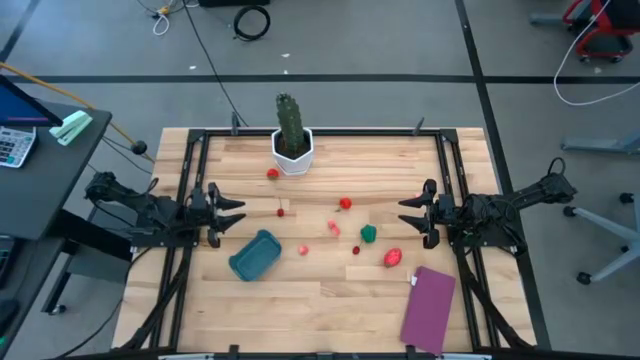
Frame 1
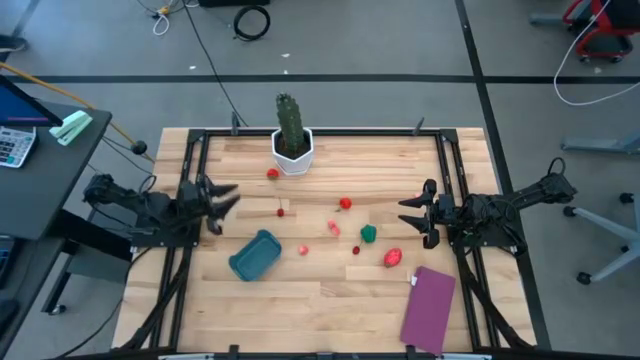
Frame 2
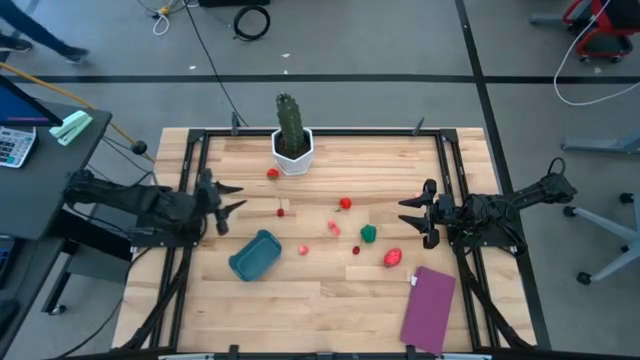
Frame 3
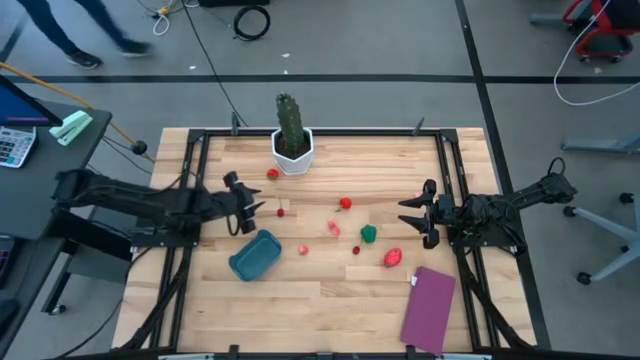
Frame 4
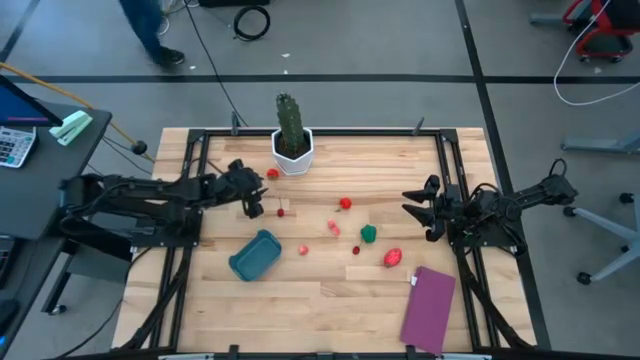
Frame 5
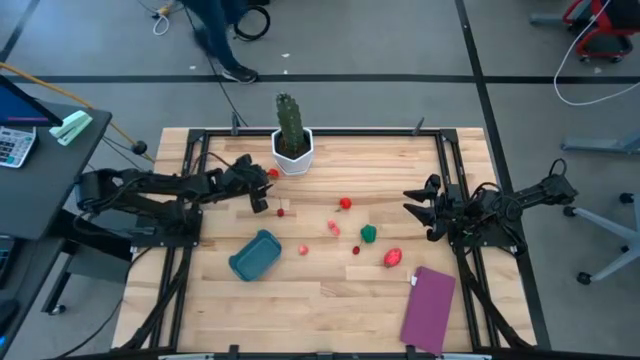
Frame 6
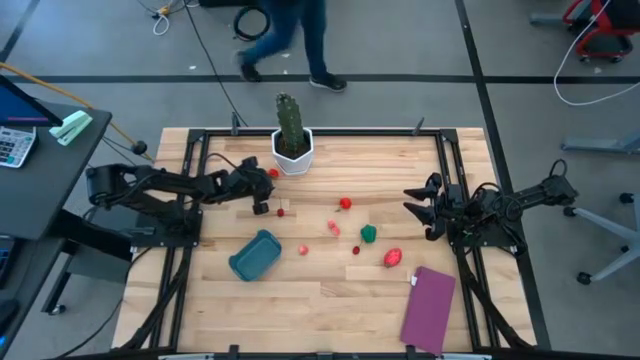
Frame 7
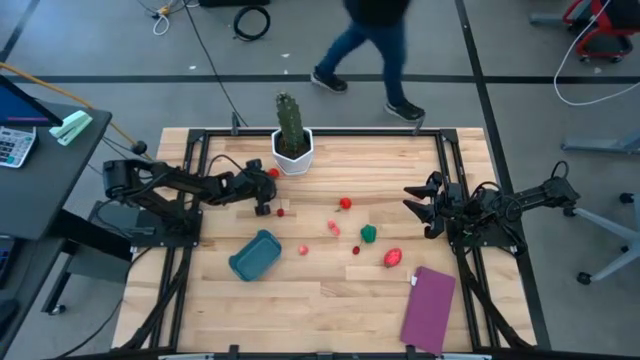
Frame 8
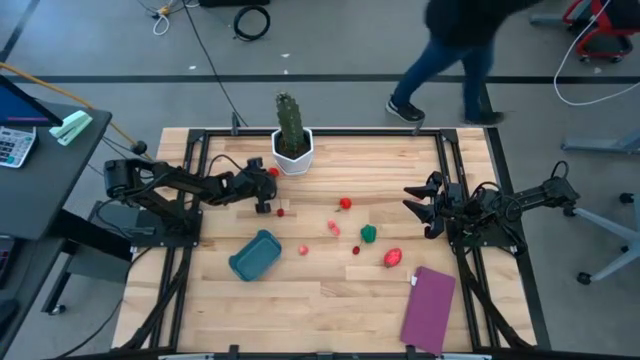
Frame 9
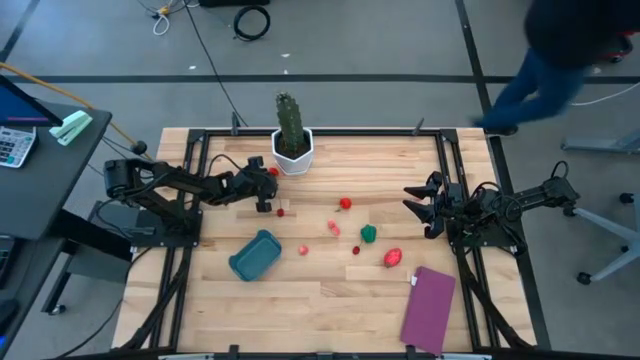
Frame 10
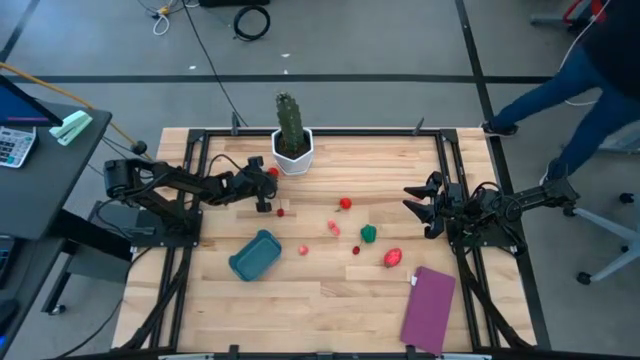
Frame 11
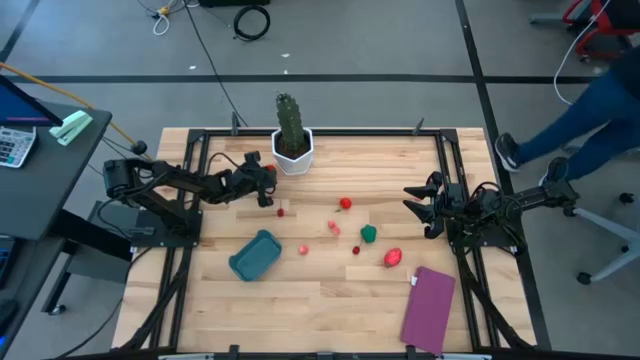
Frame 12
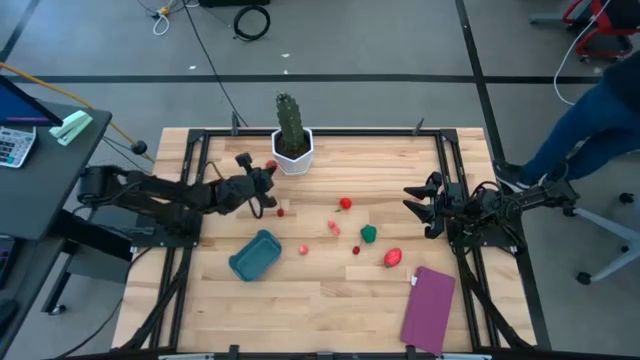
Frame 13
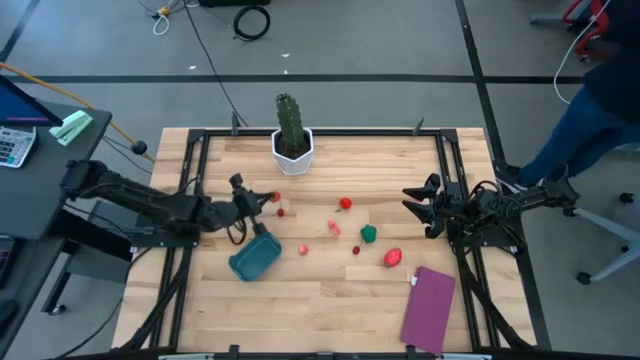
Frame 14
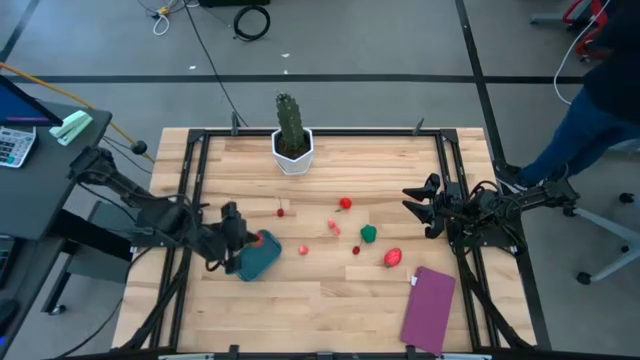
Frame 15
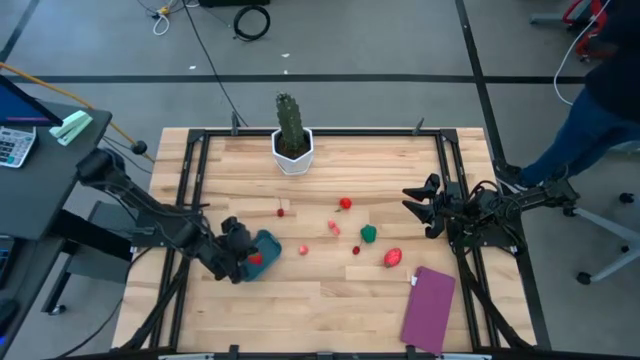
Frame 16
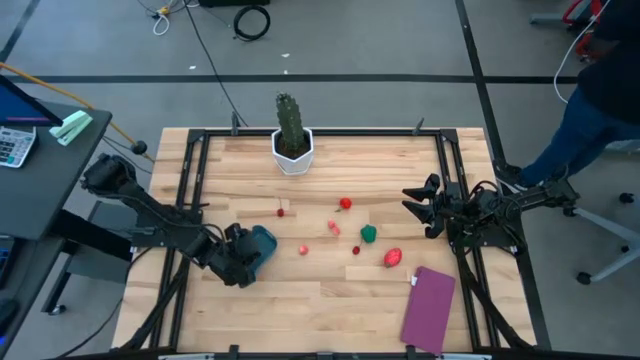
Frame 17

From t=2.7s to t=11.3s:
Task: Pick and placing Produce into tupperware
Put the left red strawberry into the blue bin

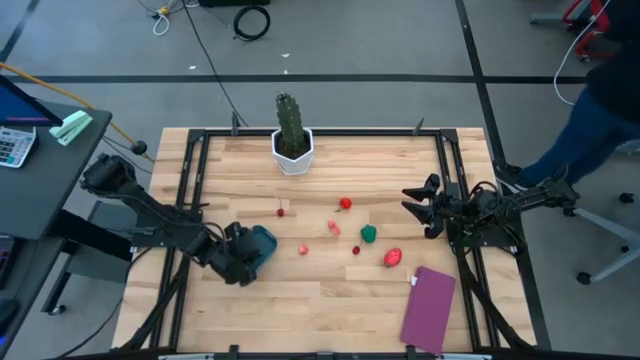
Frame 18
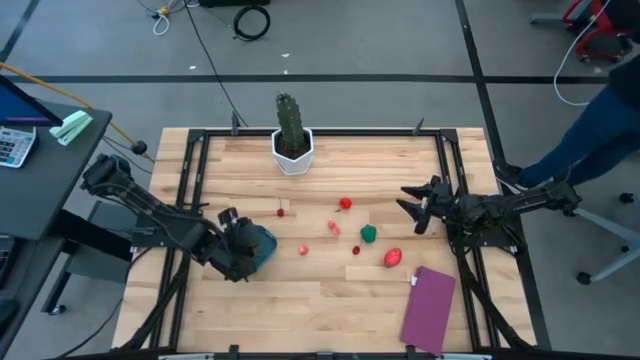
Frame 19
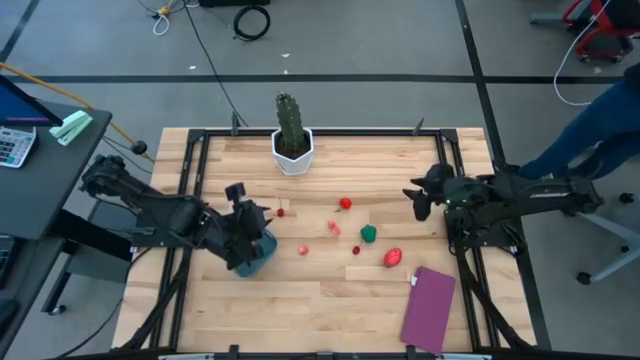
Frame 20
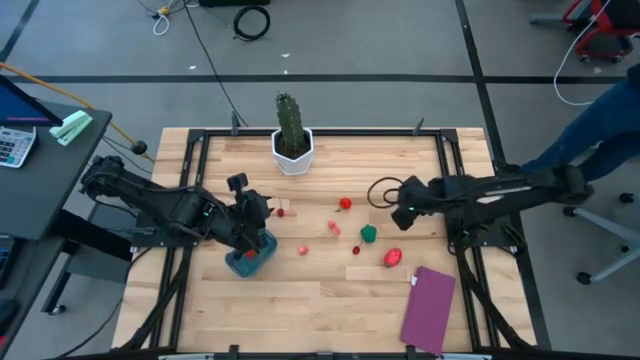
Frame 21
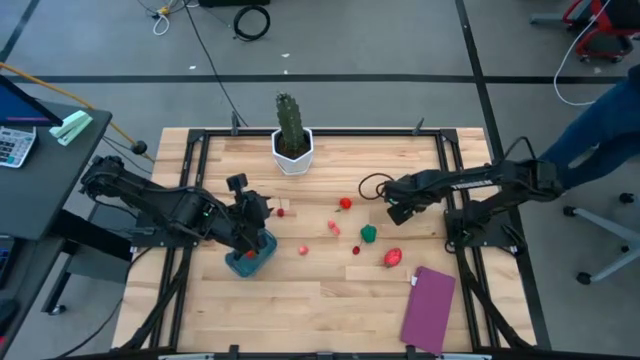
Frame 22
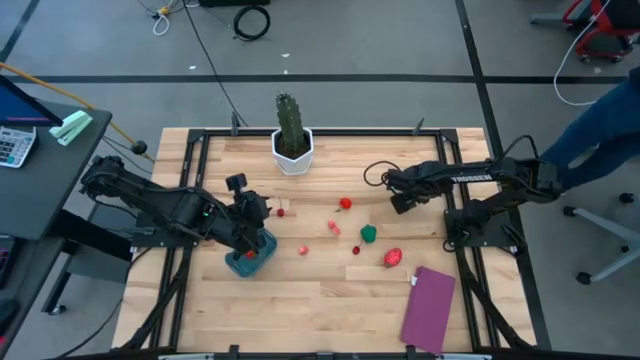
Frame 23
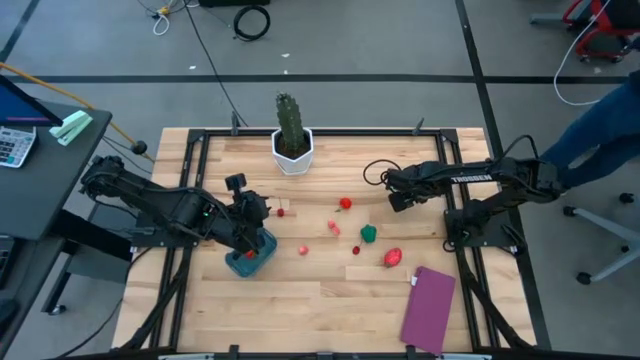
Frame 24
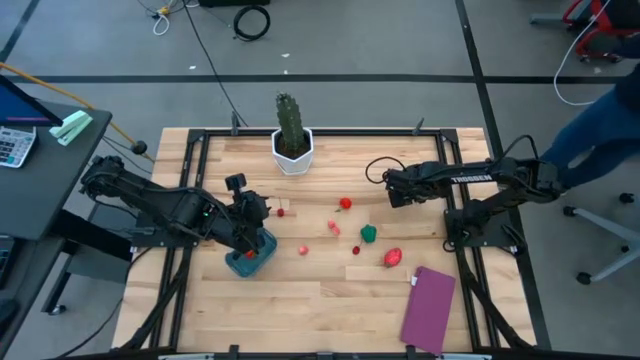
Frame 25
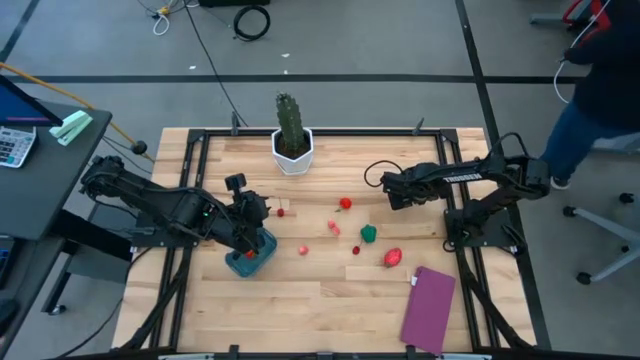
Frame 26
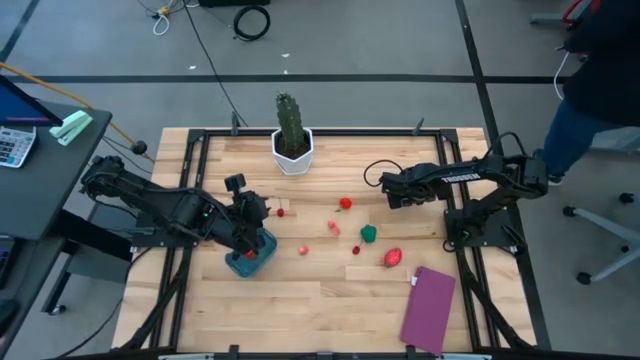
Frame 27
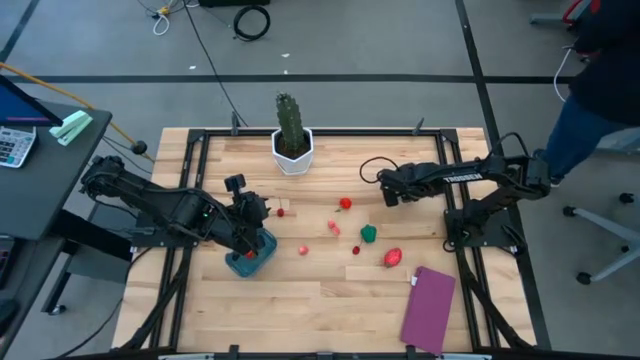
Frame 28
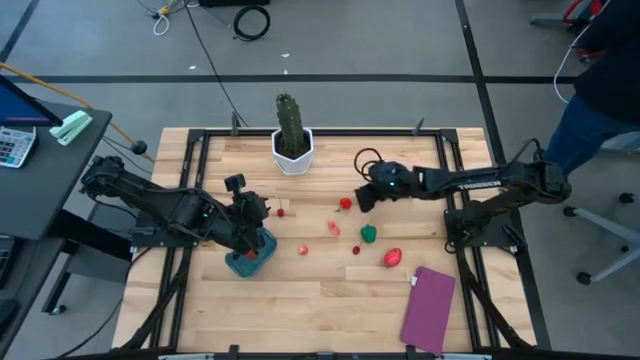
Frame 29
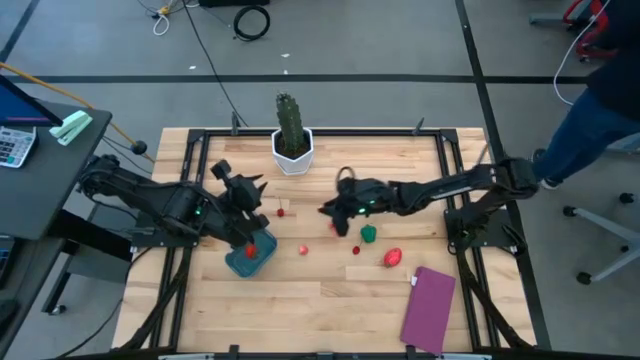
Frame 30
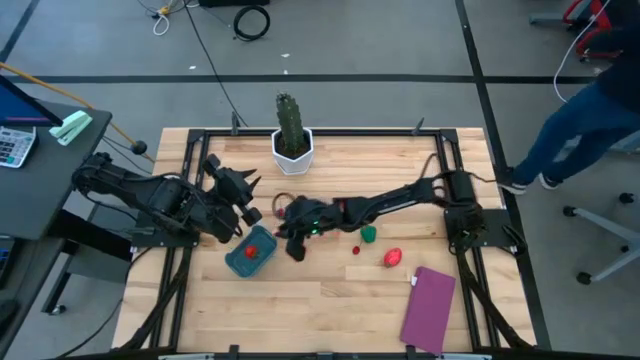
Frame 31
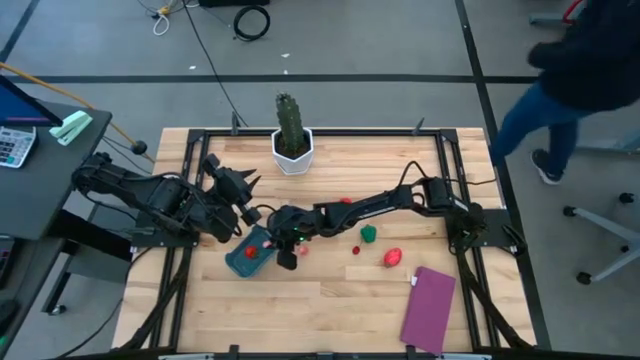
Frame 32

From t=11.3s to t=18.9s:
Put the top right pink peach into the blue bin

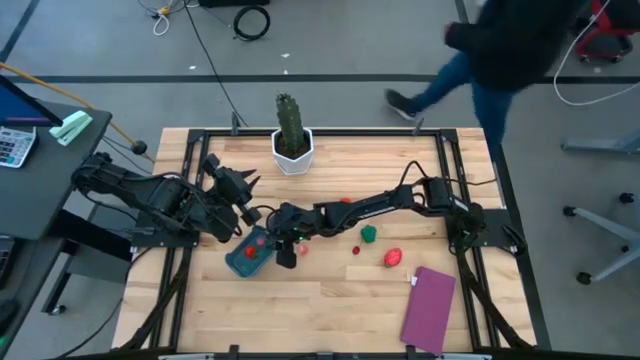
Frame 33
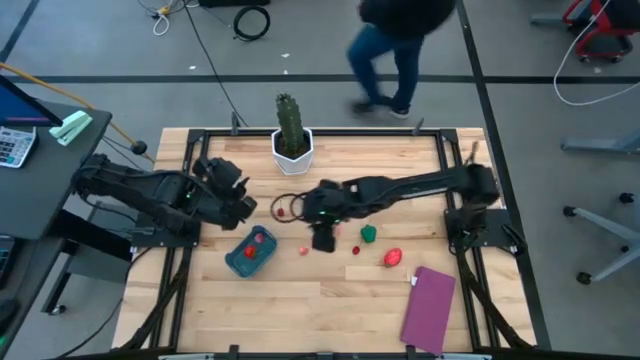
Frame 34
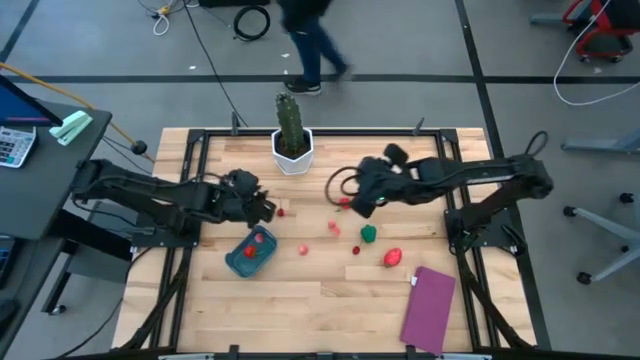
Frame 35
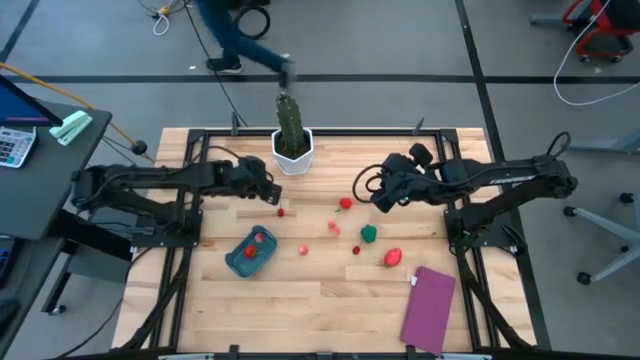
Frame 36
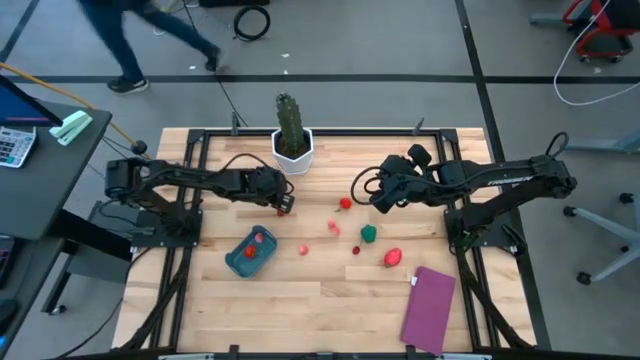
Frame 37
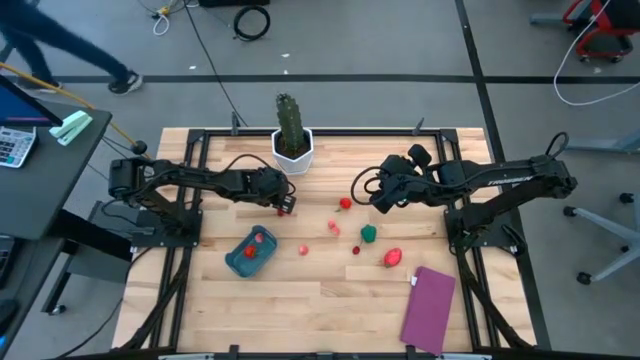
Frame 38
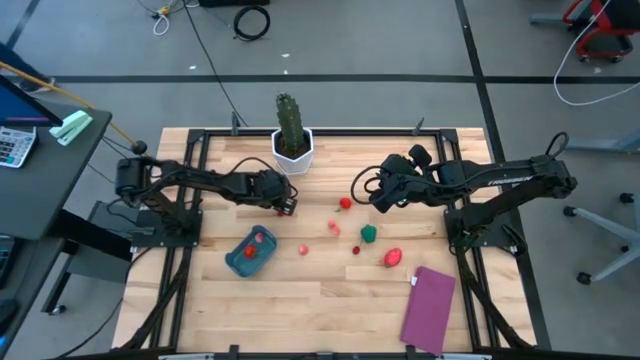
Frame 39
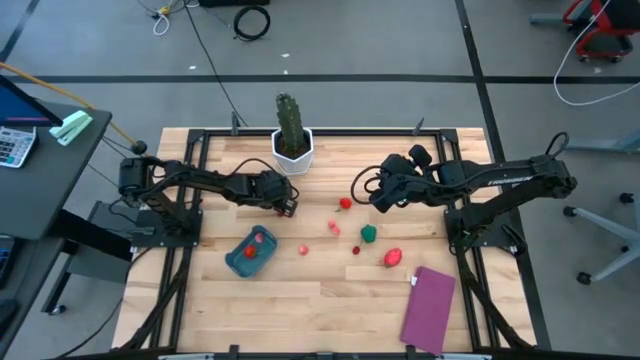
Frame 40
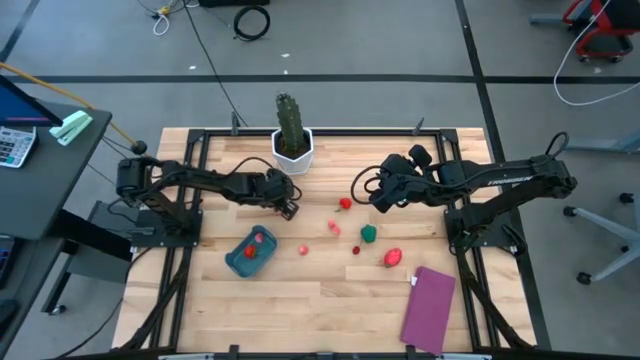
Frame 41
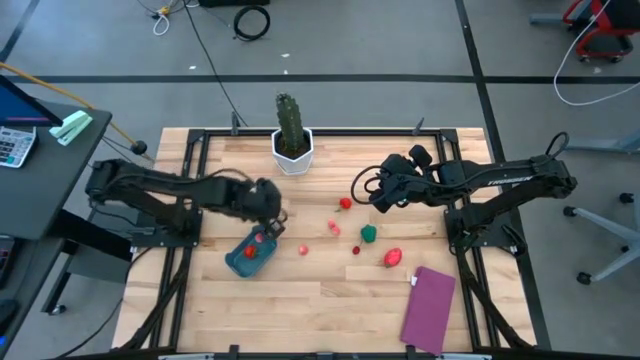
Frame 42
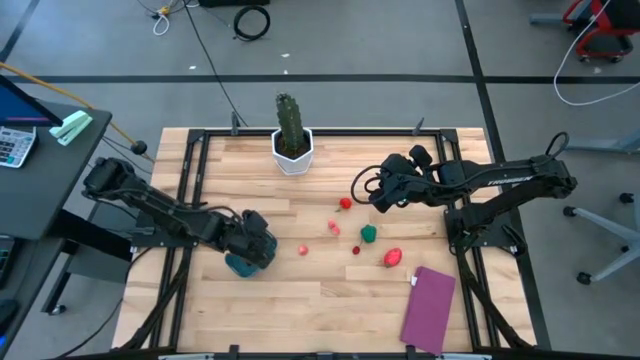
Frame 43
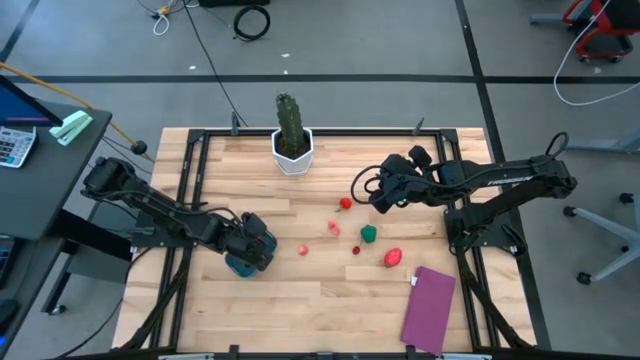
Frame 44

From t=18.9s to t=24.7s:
Put the left red cherry into the blue bin

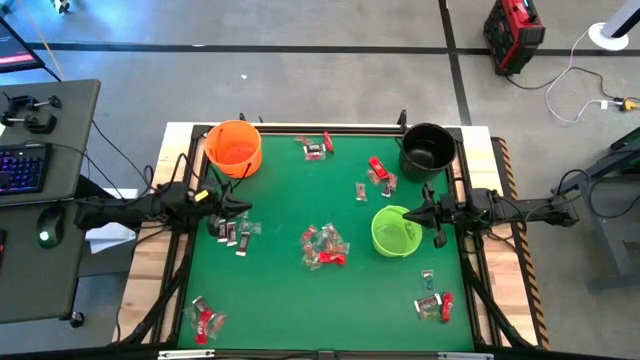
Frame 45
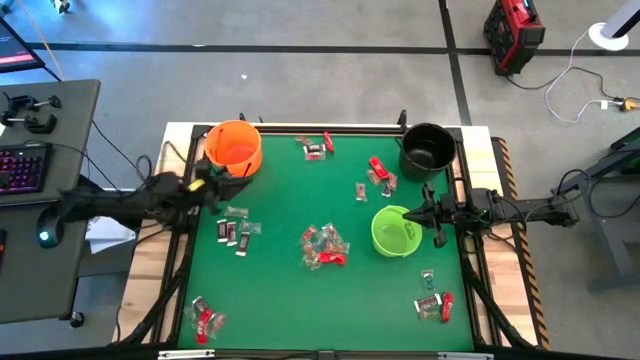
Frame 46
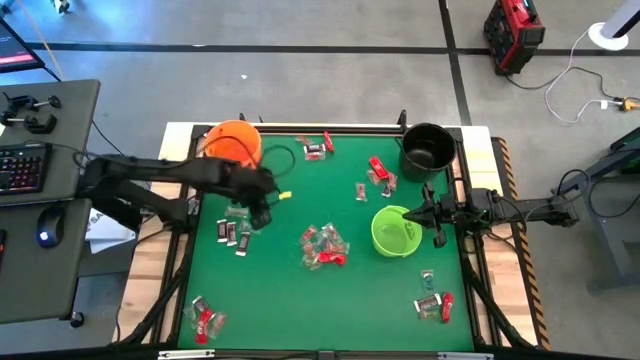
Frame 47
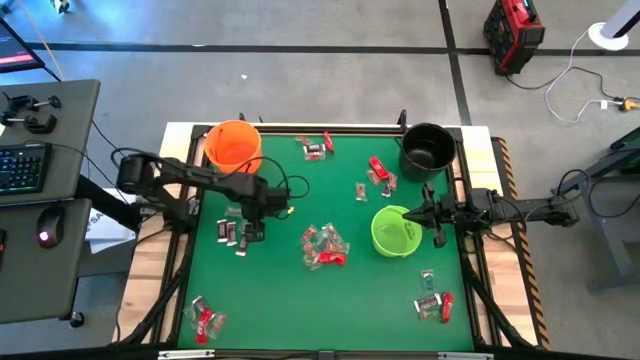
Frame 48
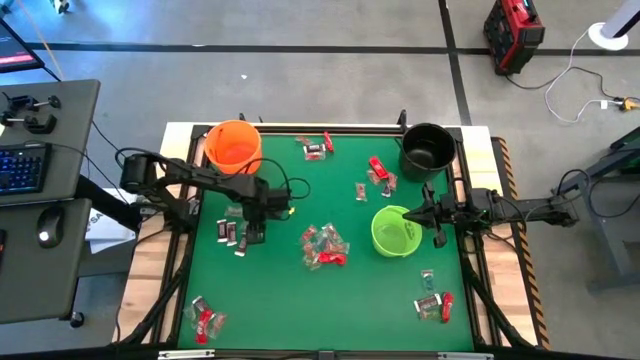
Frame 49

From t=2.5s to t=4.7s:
Task: Sort candy by brand, put in halloween buckets
Put the blue gummy into the orange bucket
